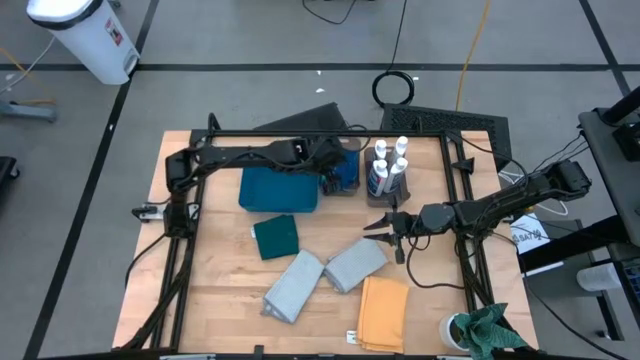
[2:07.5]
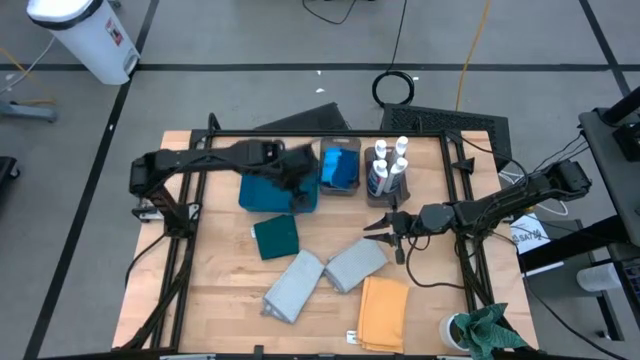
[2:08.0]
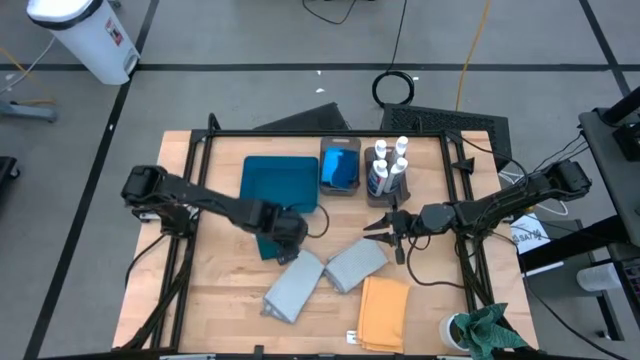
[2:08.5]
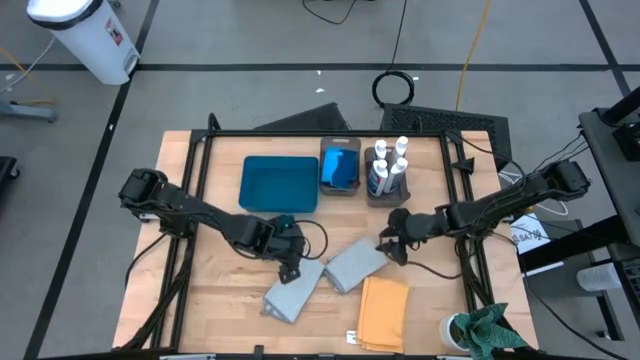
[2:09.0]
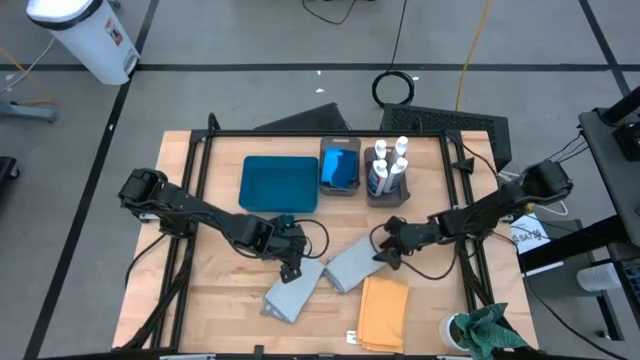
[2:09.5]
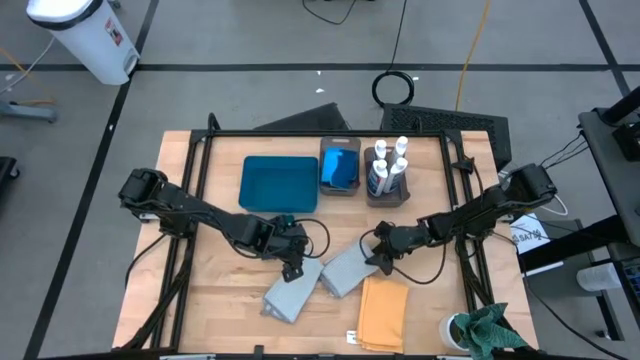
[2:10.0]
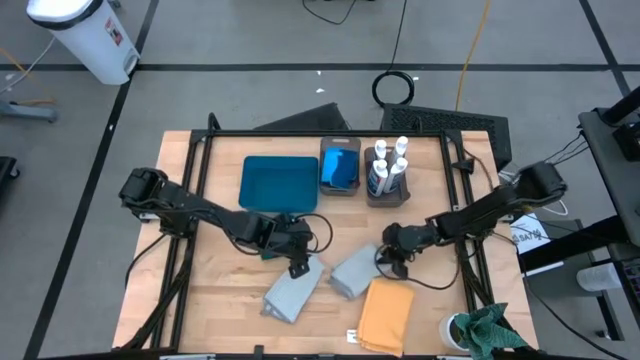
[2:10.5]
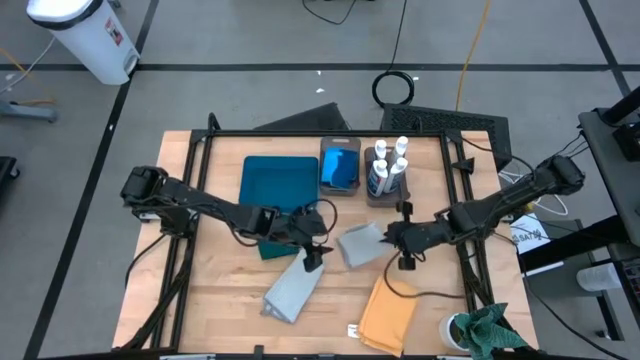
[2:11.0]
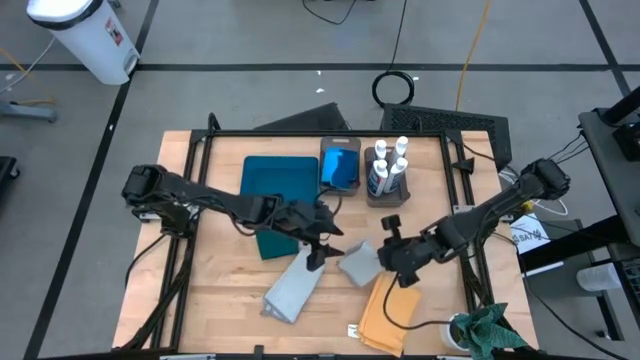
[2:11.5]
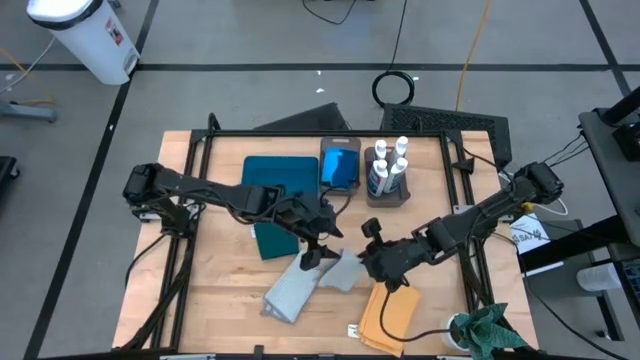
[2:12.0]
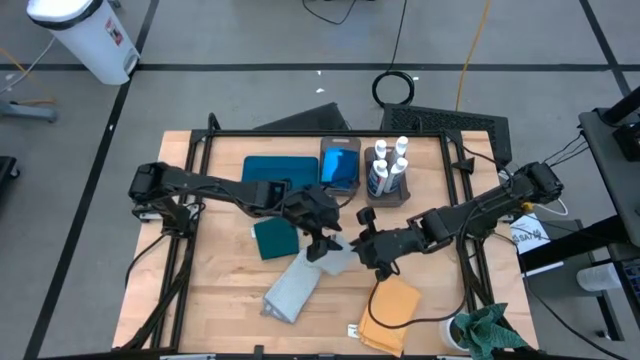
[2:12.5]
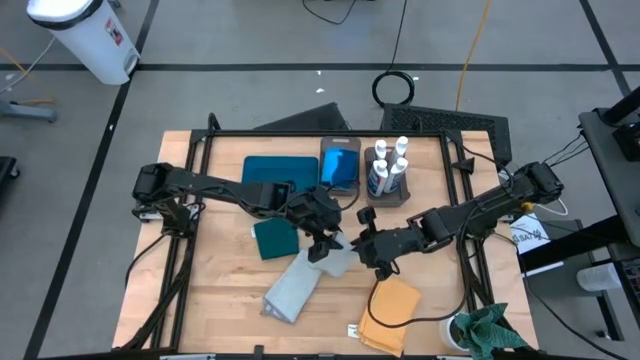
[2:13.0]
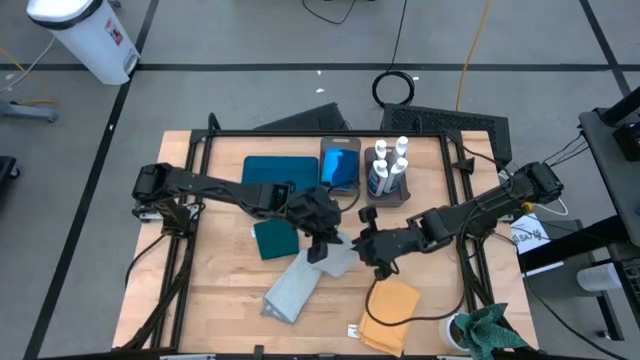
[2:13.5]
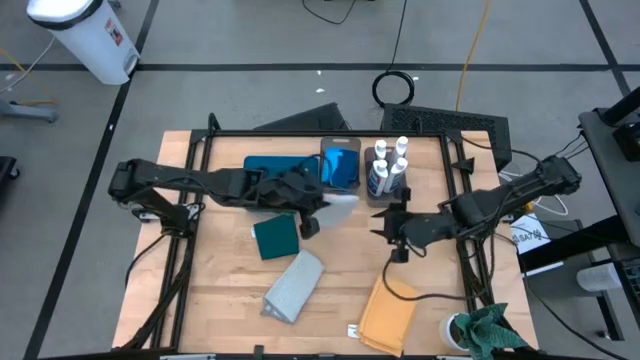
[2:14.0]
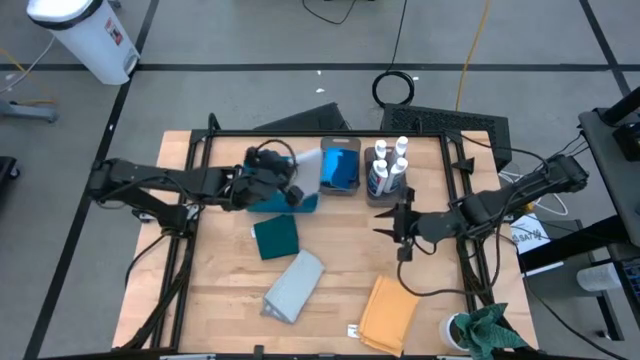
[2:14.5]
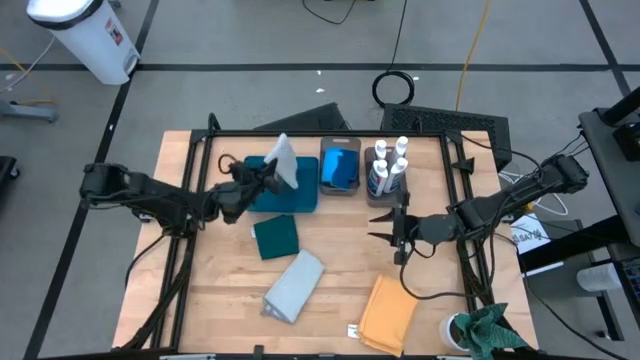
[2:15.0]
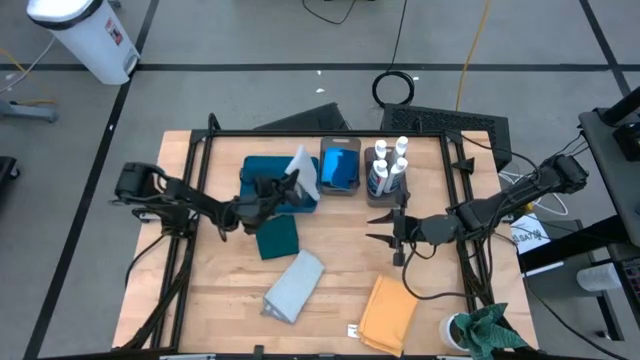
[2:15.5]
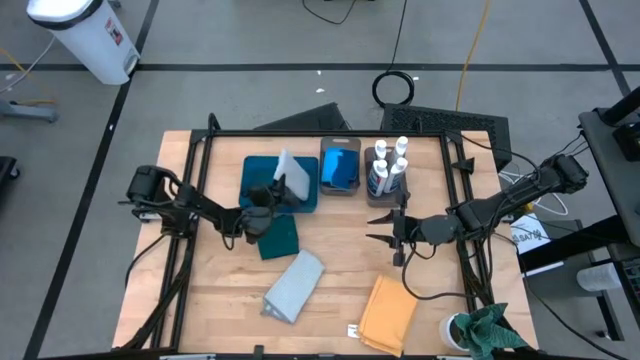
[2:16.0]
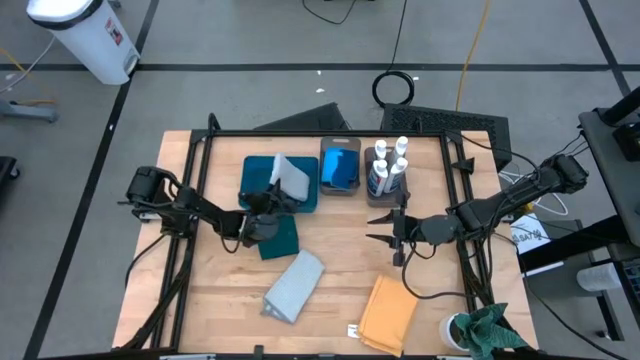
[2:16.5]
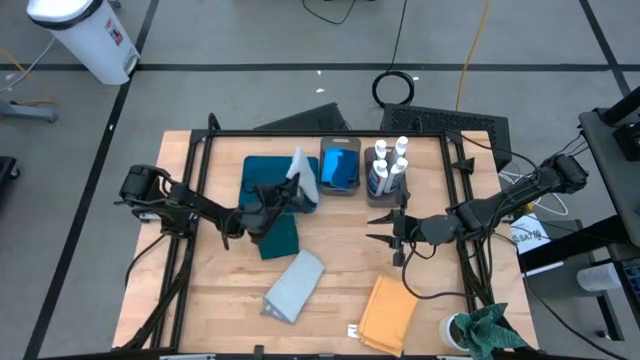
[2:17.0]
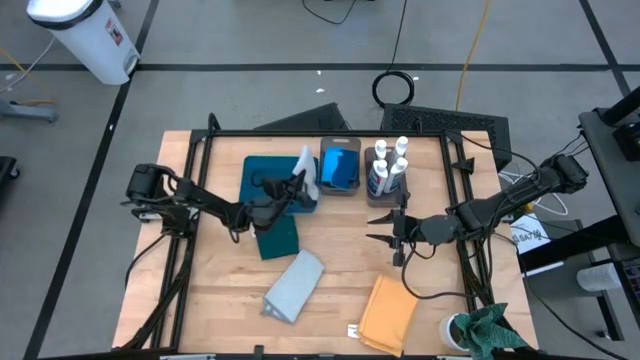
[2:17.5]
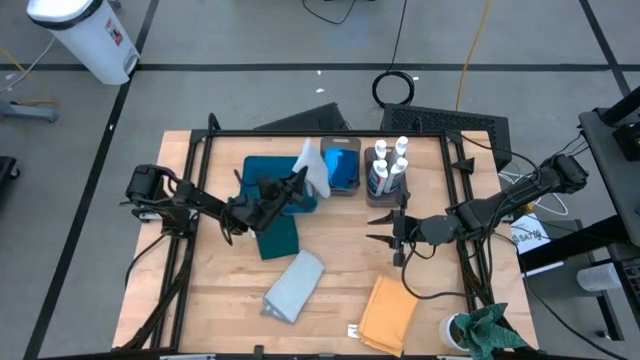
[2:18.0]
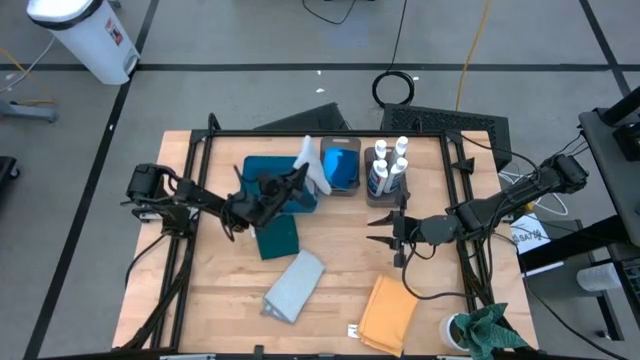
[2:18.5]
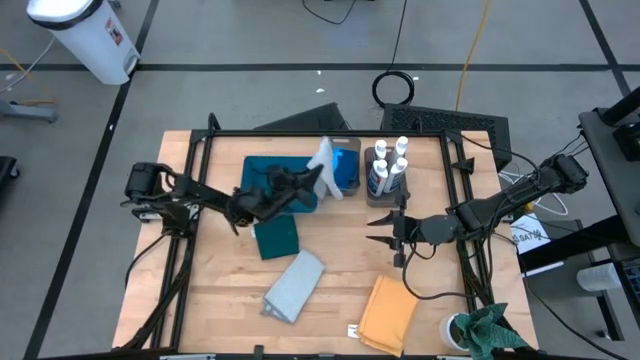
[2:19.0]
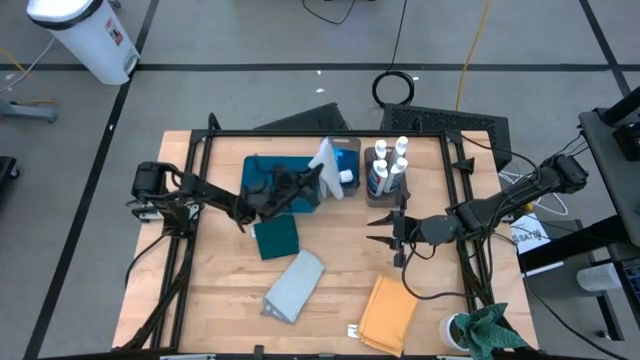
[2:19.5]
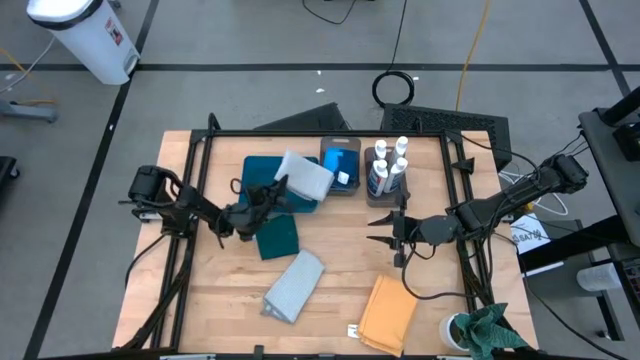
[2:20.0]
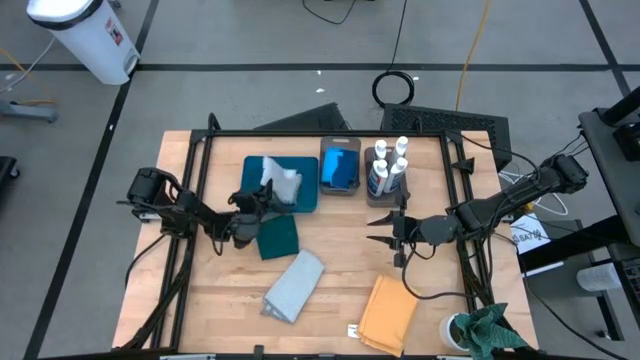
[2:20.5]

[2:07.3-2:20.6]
Task: Pick & Place Kitchen Items
Put the gray microfiber towel into the blue bin

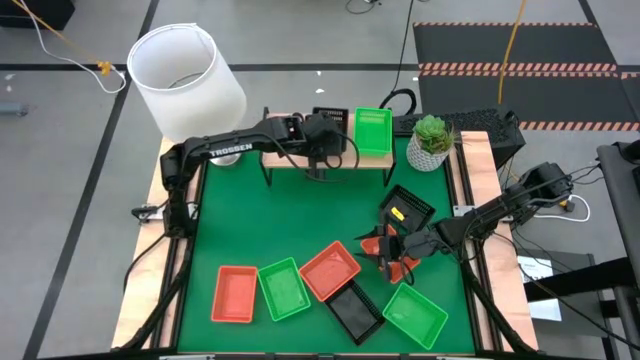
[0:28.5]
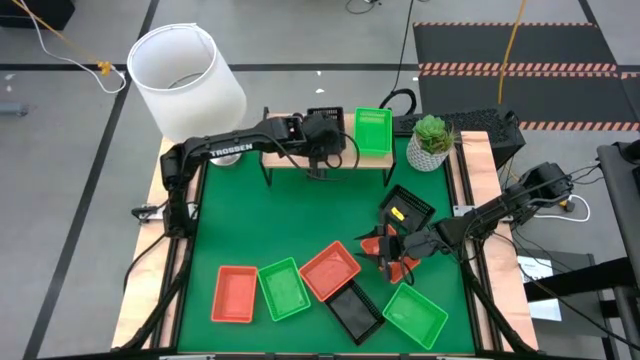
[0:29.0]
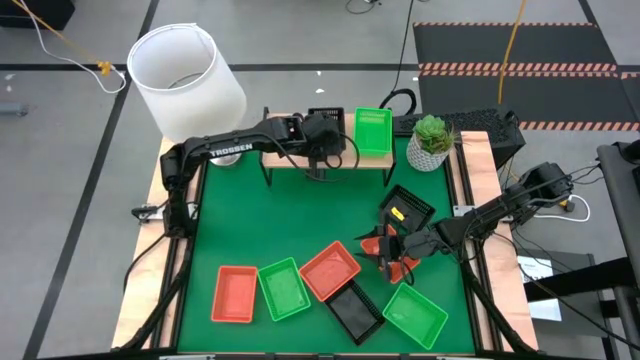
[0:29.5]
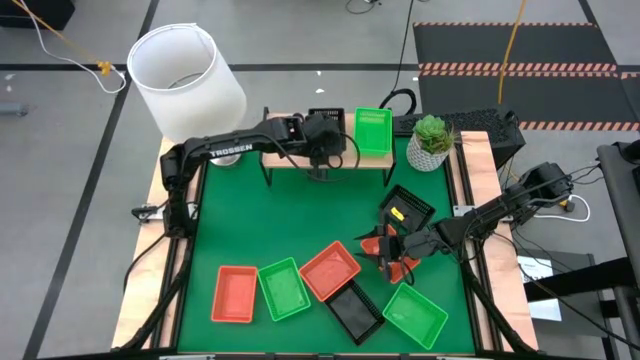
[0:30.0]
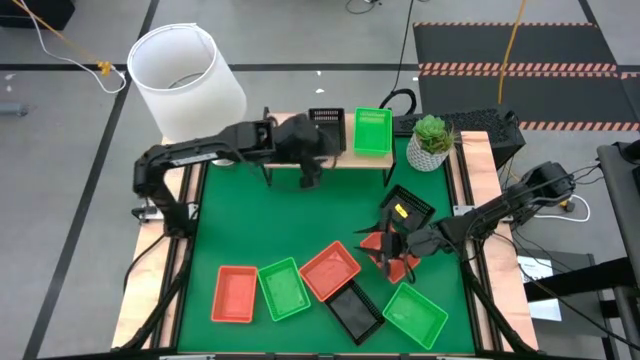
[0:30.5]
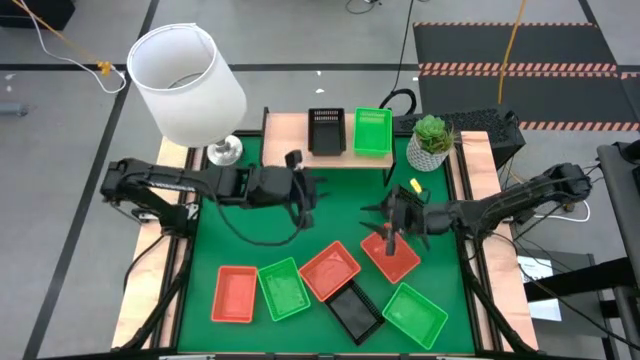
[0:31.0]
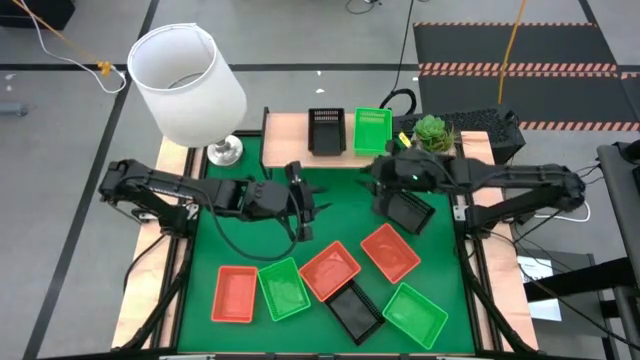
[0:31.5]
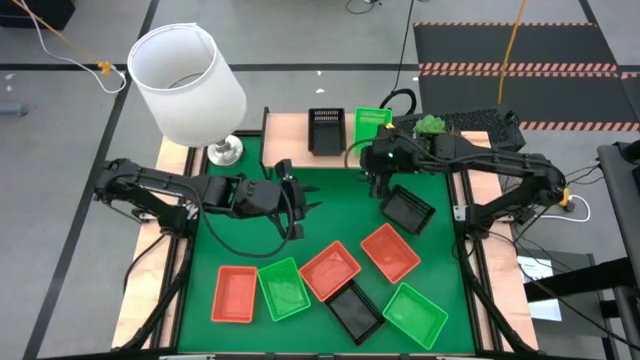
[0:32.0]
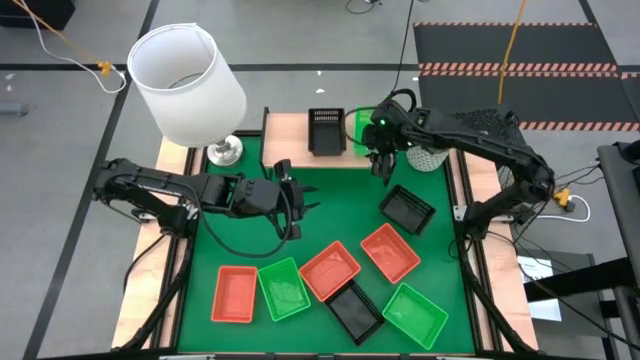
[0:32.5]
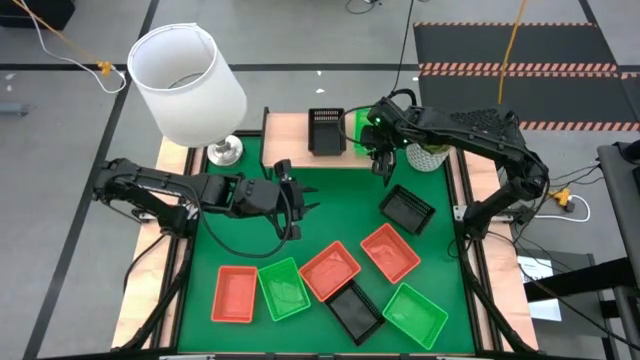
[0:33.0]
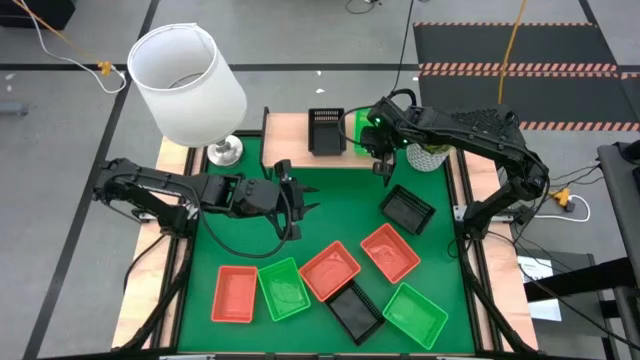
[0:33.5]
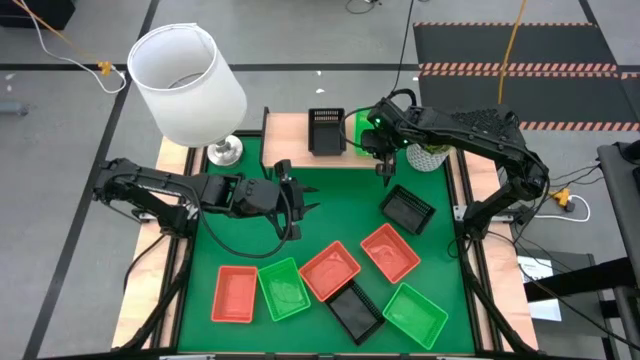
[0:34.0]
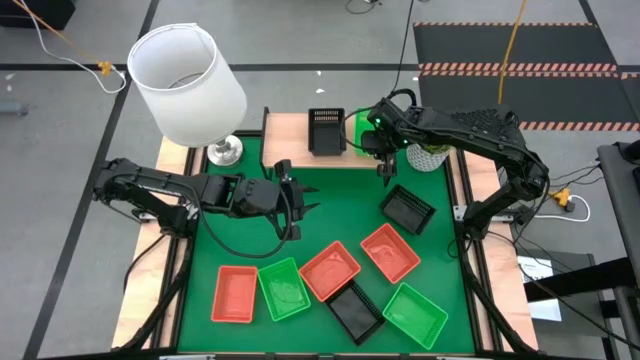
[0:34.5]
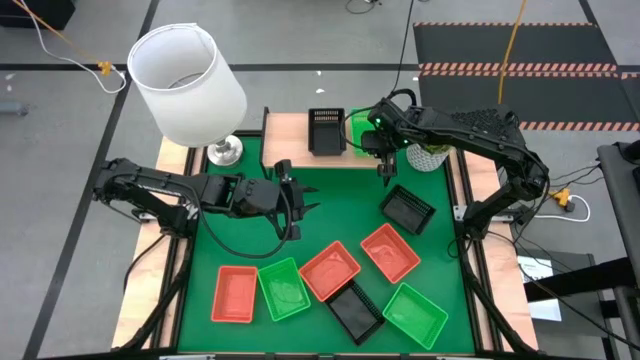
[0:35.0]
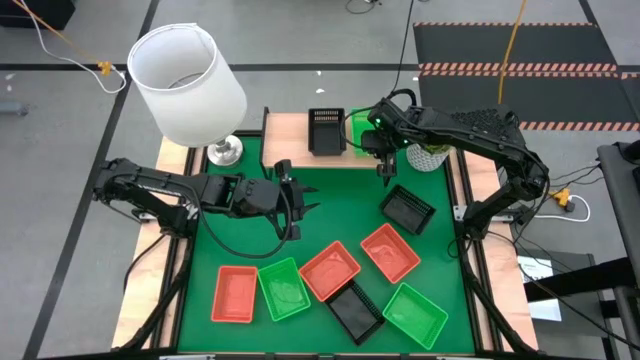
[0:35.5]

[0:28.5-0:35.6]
Task: Stack baskets on shelf by color
Adjust the green basket on the shelf
